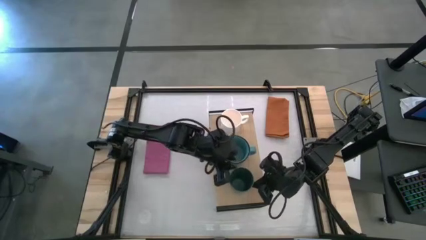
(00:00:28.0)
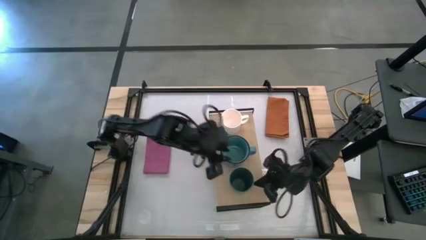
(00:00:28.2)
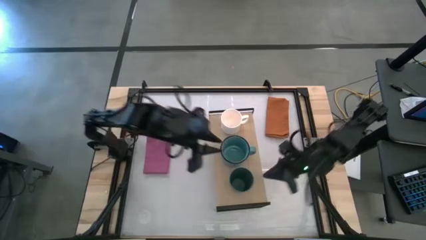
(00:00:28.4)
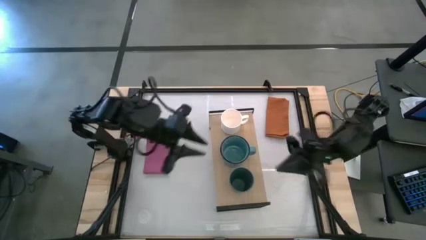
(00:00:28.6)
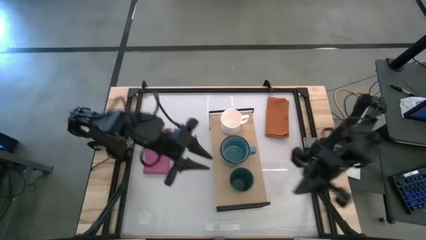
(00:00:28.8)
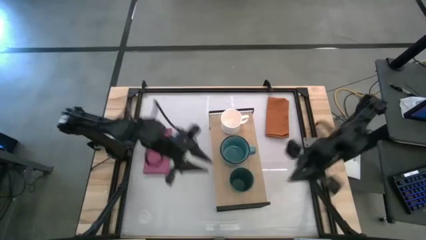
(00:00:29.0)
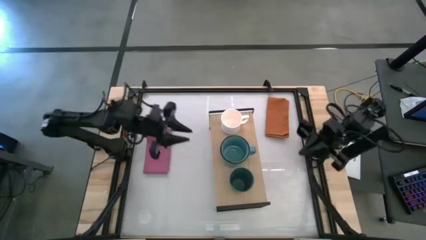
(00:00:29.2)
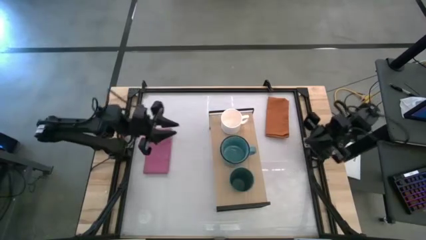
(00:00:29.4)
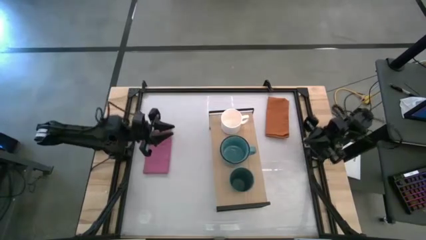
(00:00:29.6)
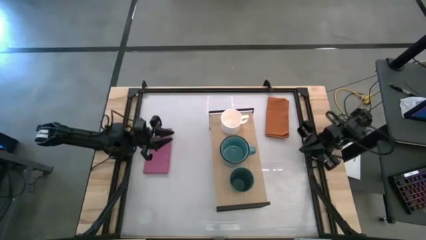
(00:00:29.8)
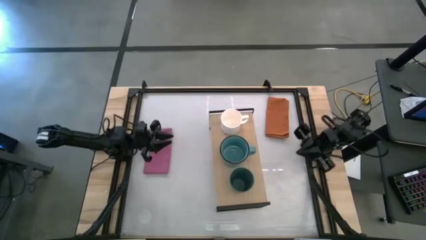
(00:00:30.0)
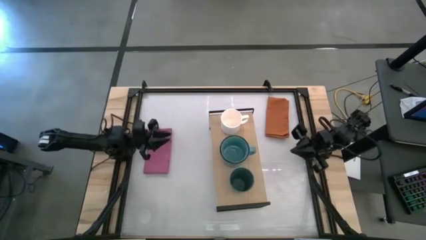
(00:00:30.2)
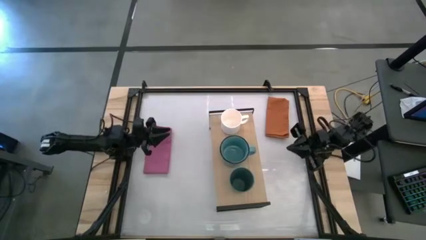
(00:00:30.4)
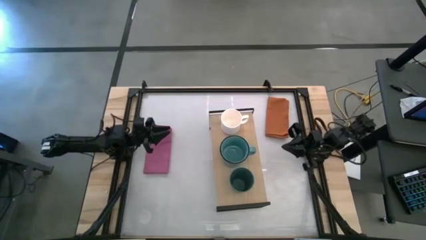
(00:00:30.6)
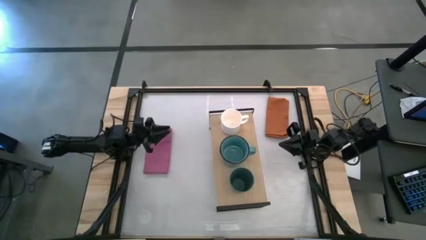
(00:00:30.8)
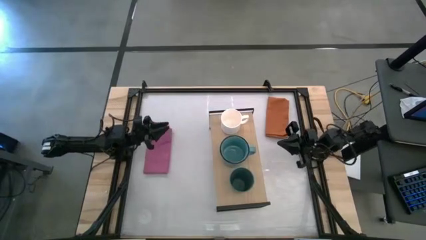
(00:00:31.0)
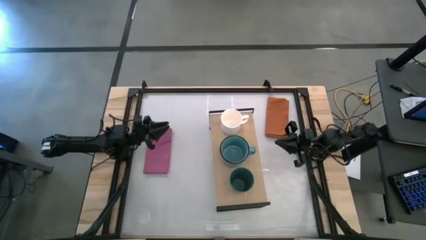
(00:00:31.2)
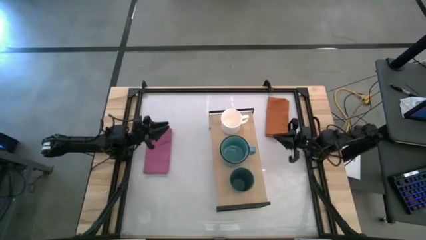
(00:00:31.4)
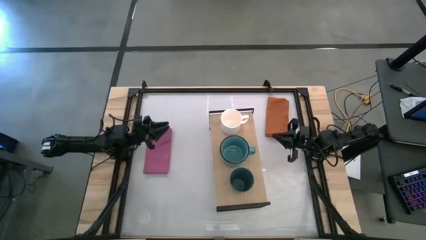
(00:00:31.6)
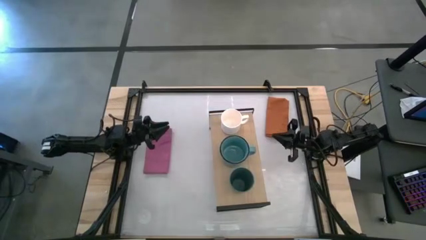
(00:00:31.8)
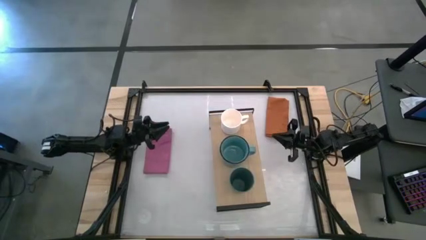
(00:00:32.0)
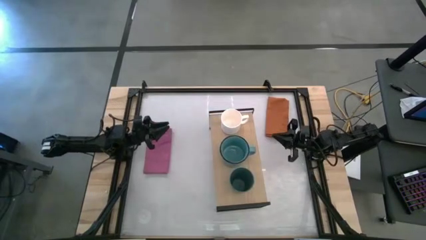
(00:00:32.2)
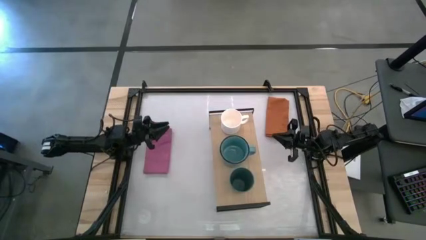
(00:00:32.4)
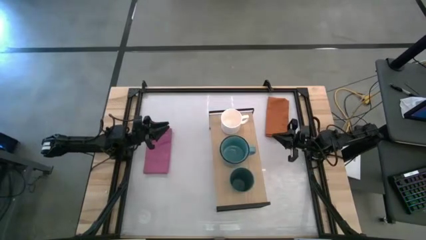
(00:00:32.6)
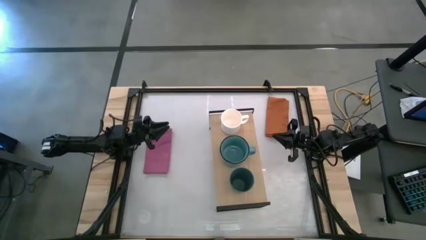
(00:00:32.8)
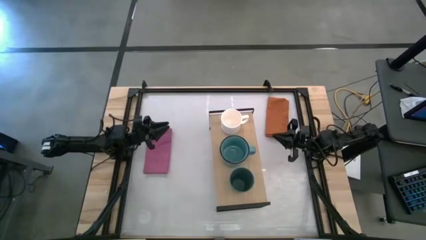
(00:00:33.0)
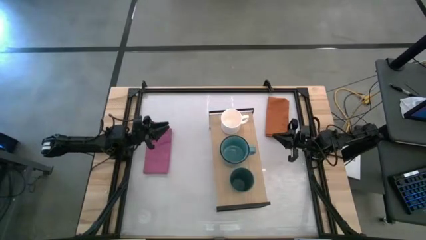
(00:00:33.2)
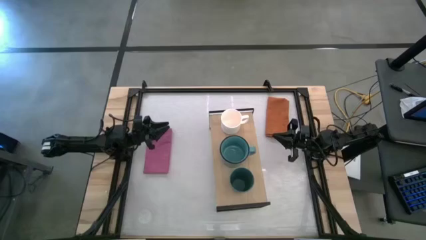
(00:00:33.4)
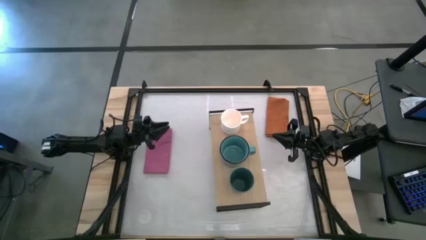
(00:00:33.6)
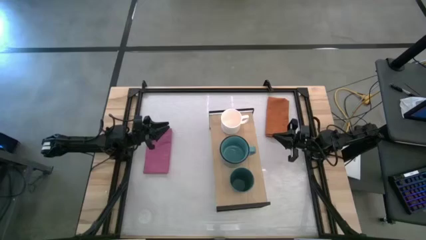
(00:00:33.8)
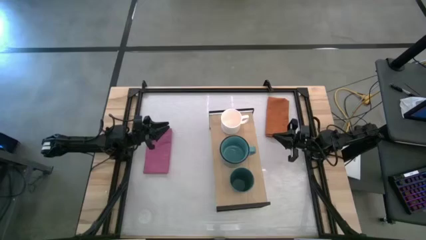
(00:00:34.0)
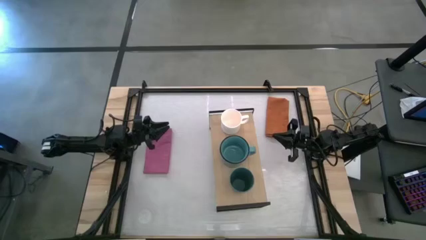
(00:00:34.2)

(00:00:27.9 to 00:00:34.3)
Task: Stack small to large cups/mugs on shelf
Return to Home Position

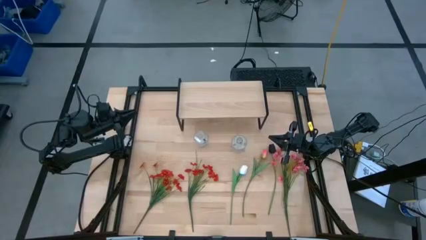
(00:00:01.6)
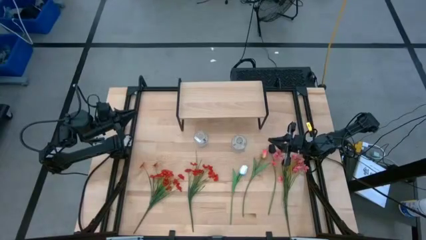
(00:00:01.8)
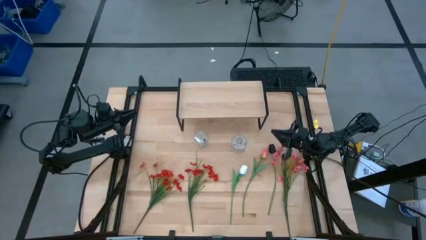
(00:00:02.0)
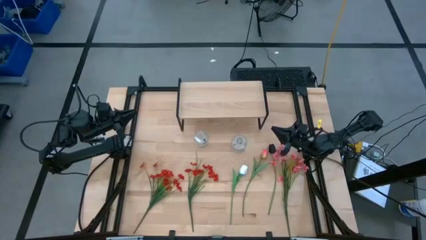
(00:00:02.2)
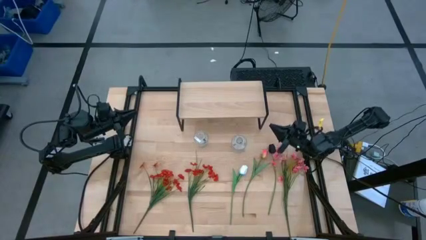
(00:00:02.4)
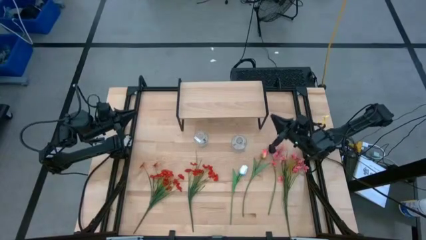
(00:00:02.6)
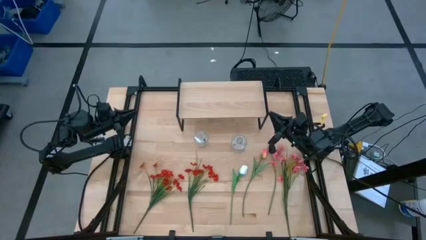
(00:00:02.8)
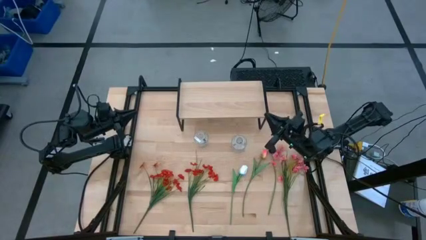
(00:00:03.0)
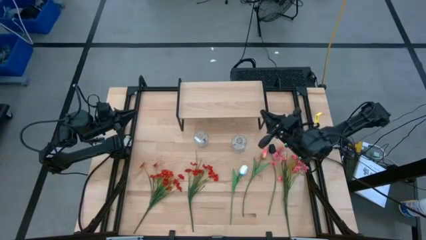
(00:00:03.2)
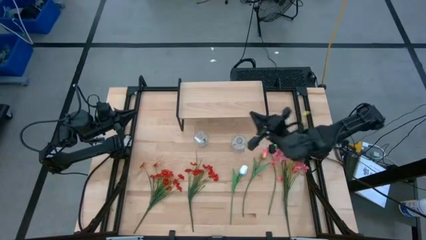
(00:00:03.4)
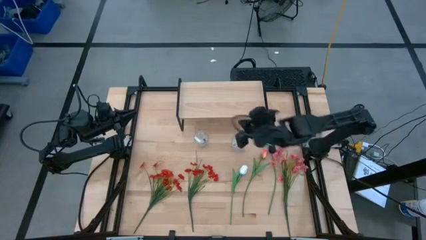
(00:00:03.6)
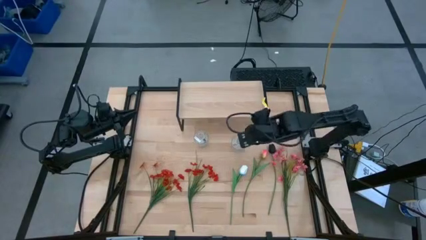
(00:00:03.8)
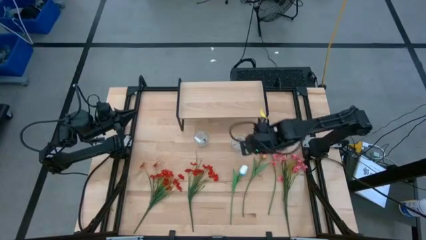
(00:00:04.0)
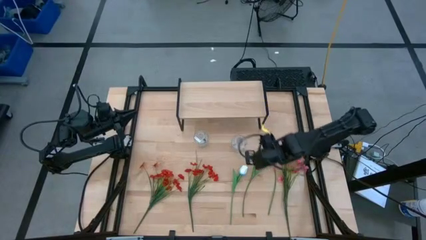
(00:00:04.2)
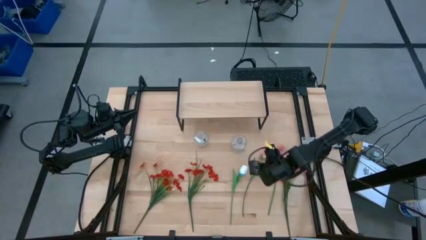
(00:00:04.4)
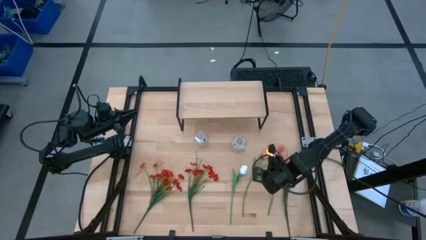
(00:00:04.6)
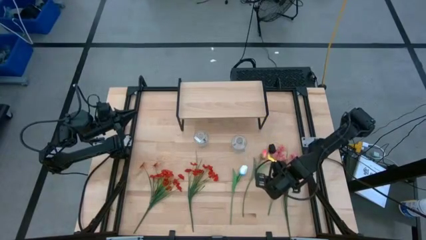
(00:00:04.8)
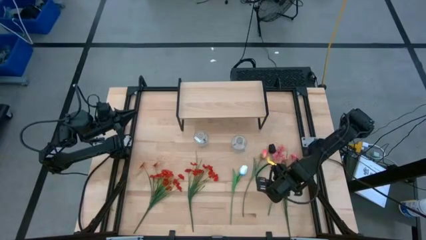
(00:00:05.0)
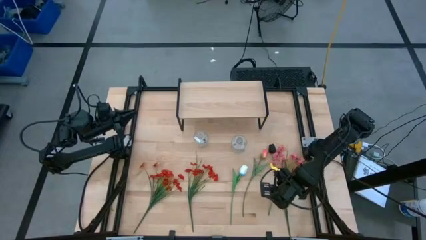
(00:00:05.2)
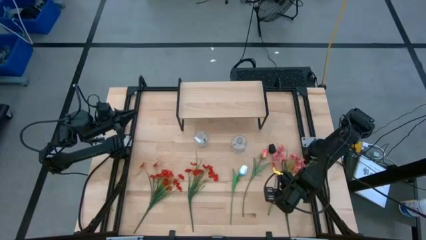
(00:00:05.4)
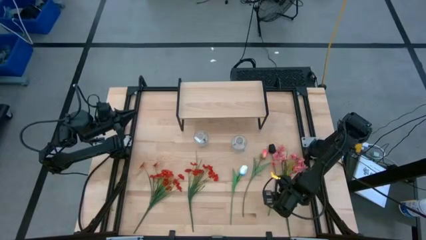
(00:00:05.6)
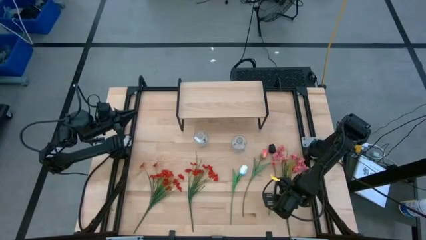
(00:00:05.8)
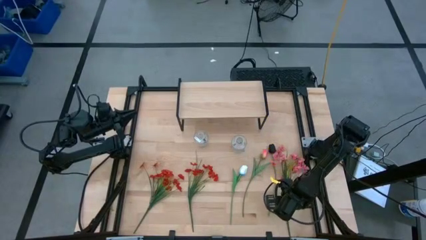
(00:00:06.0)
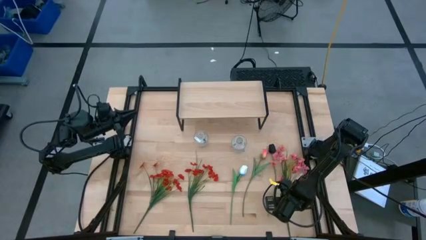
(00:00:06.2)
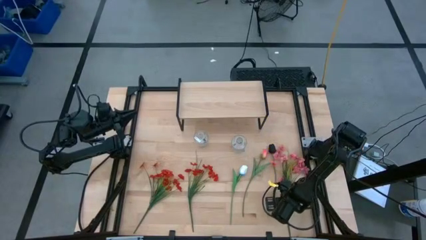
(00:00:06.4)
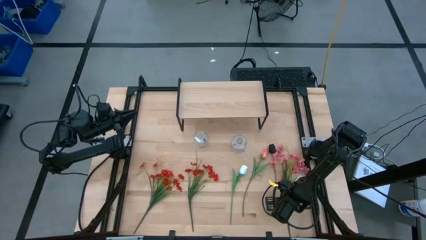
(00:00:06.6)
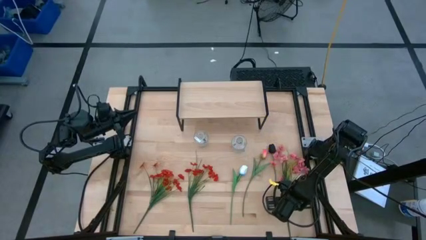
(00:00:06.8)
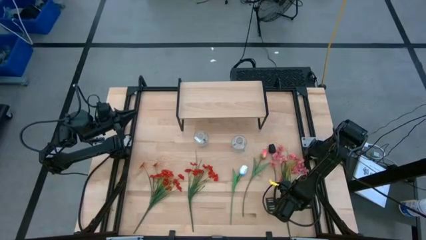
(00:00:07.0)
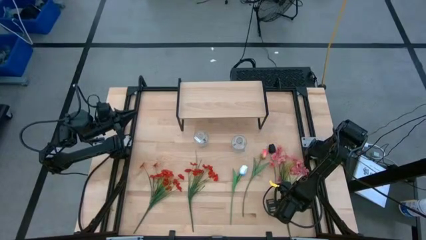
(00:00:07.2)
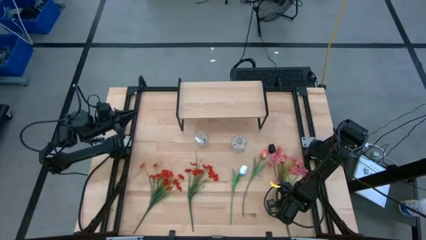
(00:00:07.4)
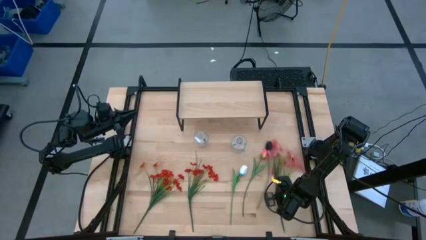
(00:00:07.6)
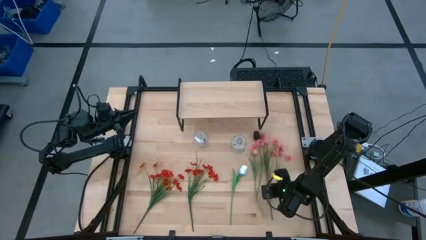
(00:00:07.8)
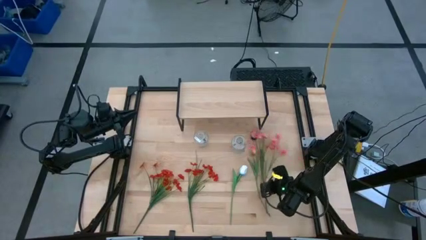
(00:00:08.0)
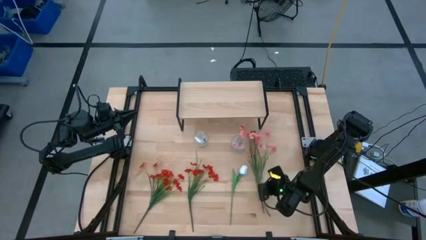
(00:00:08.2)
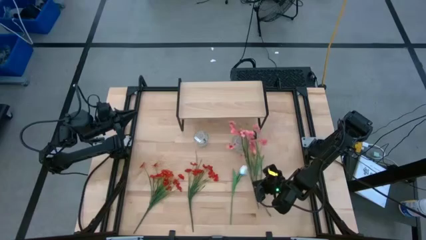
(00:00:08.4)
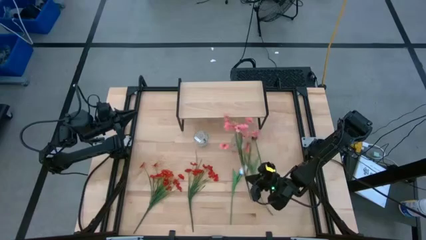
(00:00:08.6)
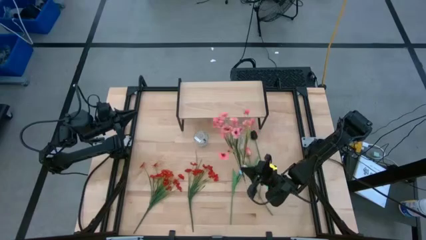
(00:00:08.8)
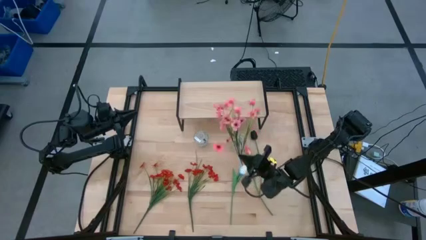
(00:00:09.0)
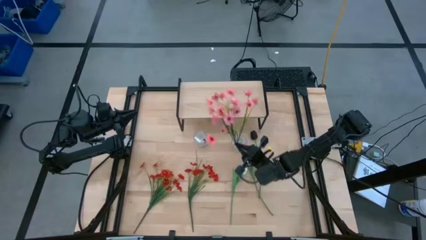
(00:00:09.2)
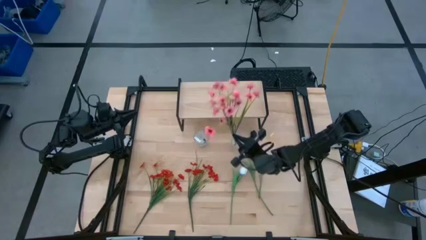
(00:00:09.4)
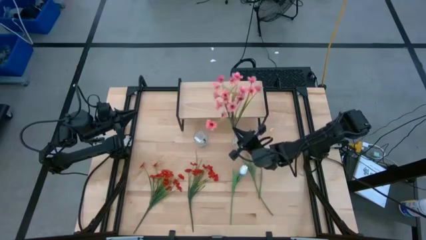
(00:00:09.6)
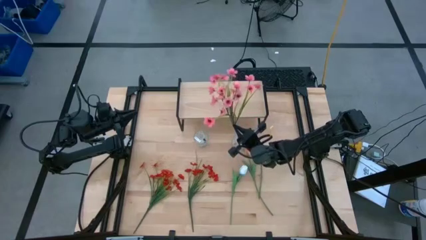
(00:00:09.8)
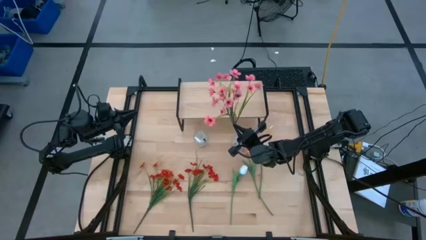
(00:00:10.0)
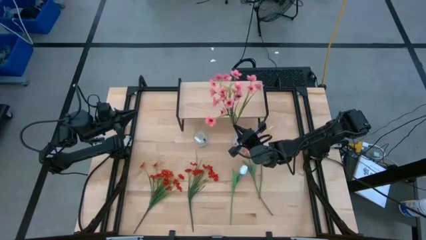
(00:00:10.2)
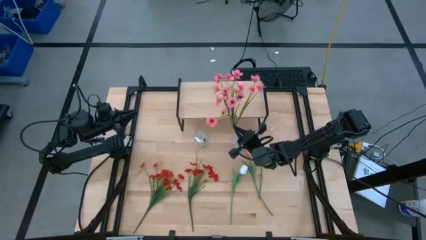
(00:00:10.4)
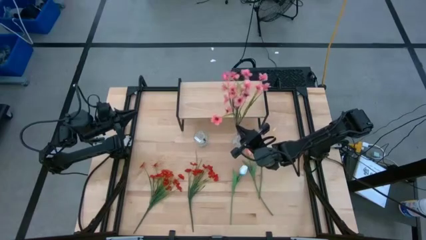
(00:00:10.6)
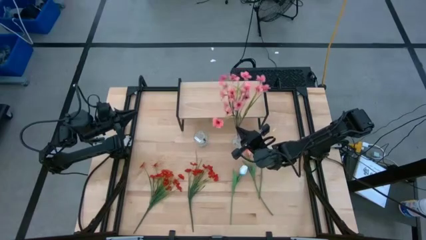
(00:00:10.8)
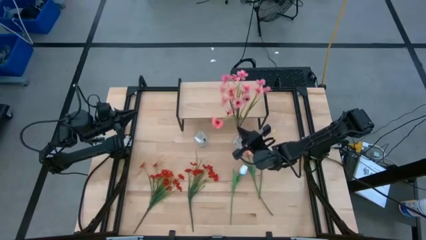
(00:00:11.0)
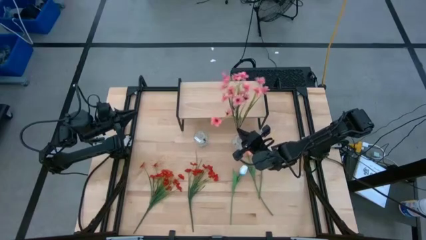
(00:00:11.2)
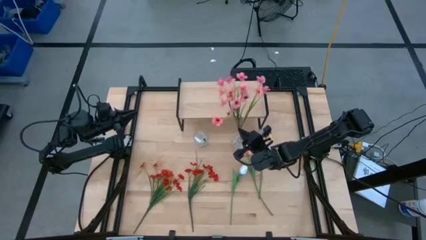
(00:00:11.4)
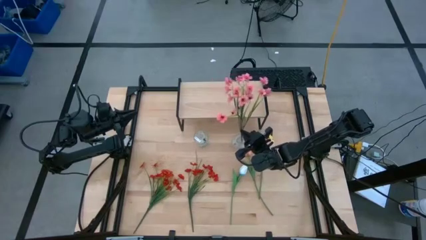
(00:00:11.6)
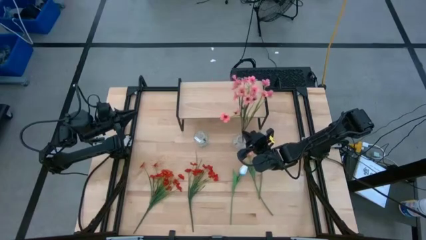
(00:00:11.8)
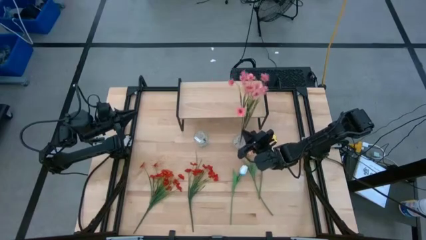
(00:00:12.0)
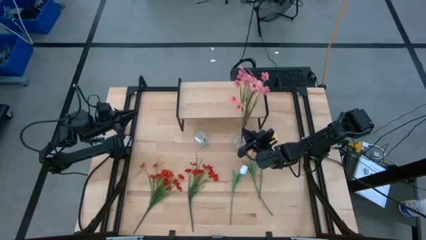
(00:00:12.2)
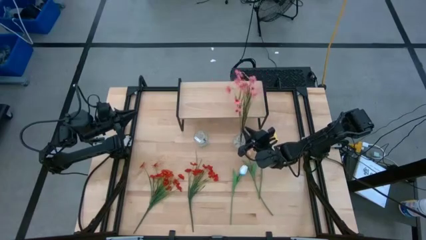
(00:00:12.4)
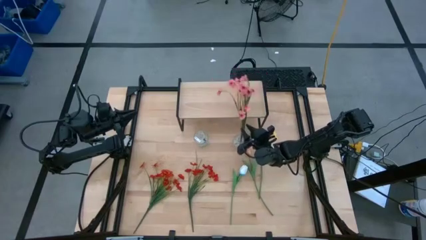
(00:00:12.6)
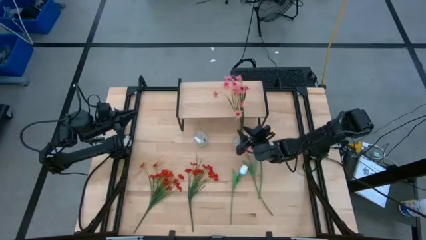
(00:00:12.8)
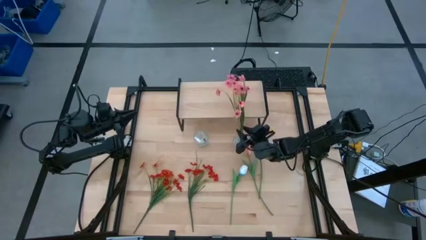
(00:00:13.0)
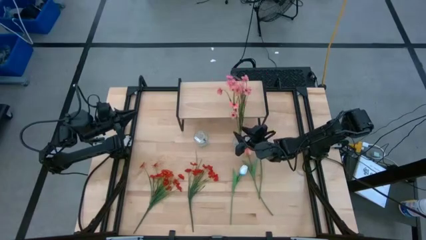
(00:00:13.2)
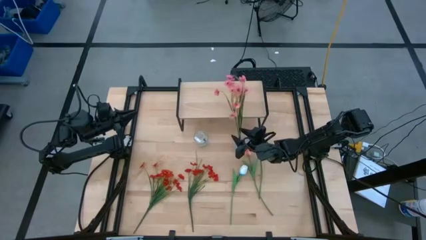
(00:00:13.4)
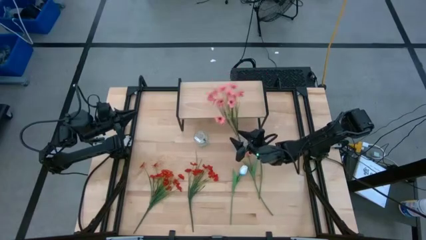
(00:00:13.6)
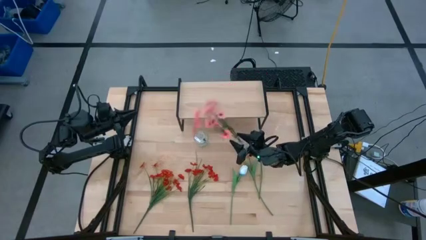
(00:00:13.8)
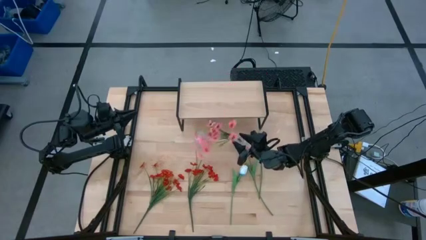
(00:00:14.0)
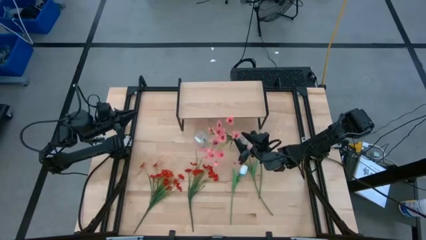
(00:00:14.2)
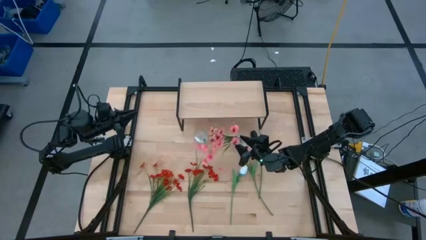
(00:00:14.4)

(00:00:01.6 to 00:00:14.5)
Task: Pick and place flowers into a vace then onto a shelf
Put the pink flowers into the right transparent vase
